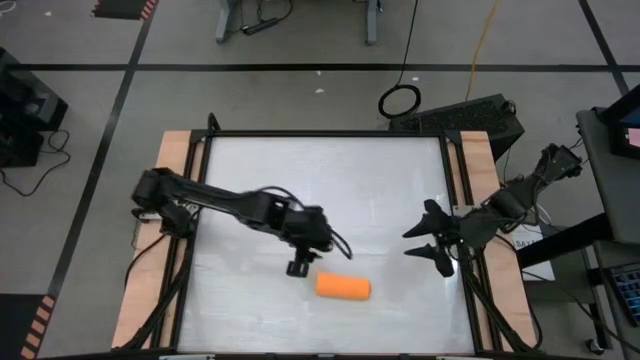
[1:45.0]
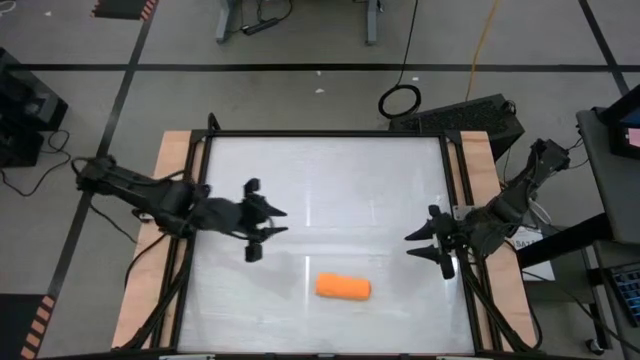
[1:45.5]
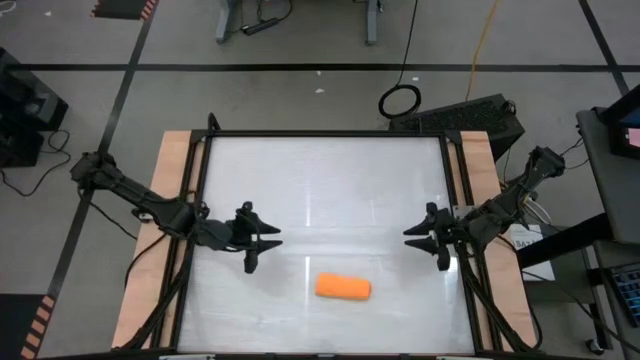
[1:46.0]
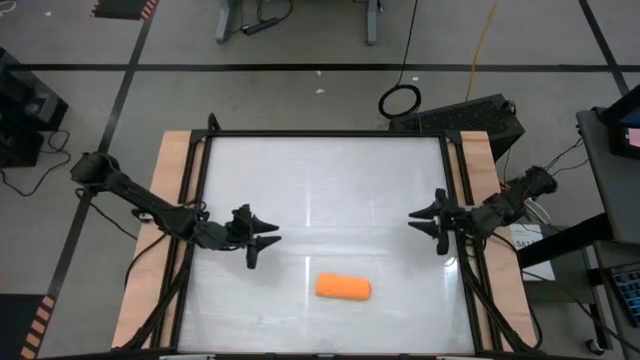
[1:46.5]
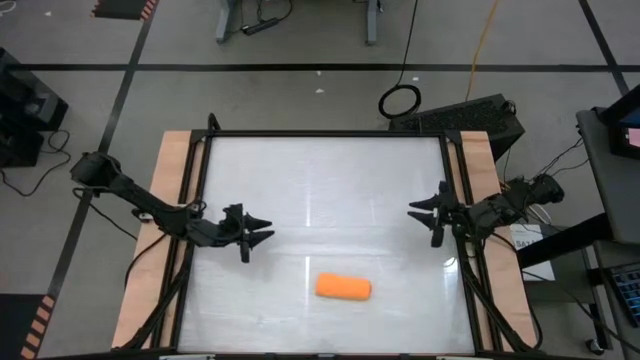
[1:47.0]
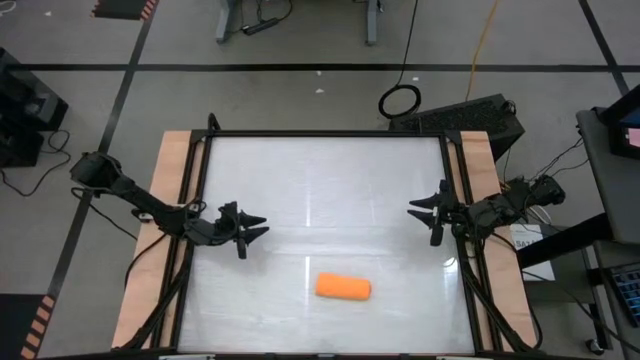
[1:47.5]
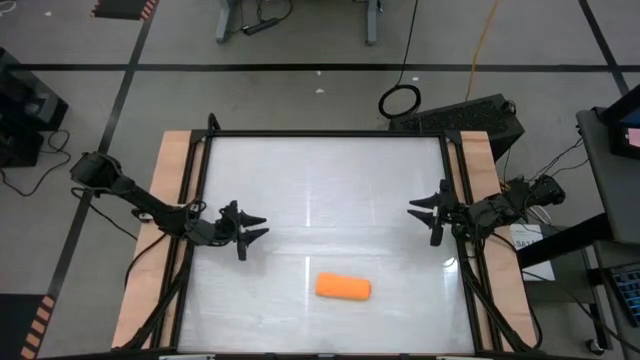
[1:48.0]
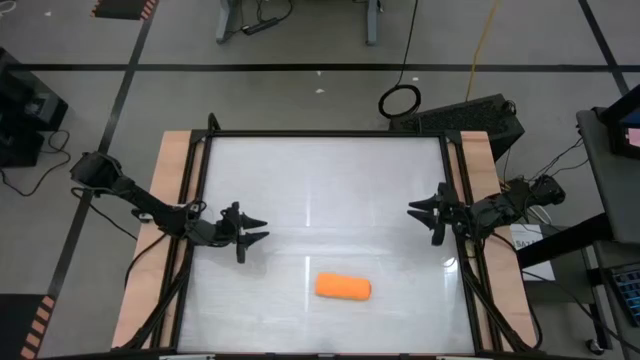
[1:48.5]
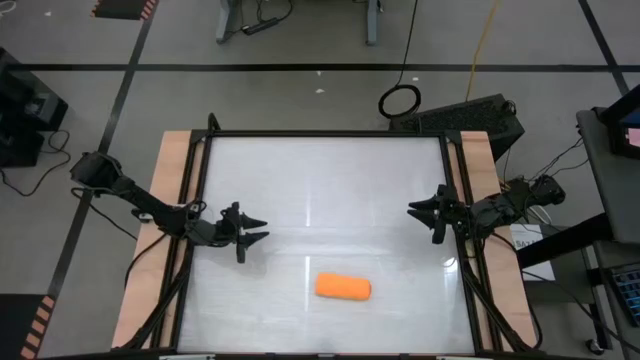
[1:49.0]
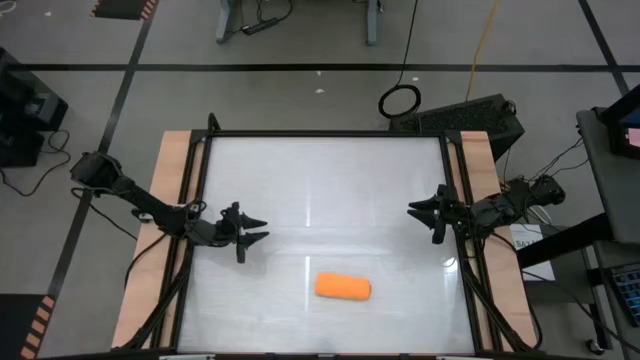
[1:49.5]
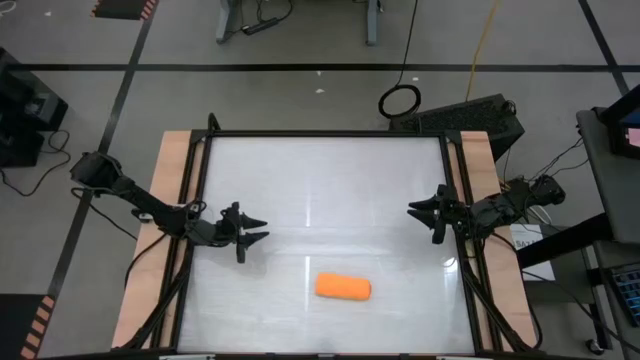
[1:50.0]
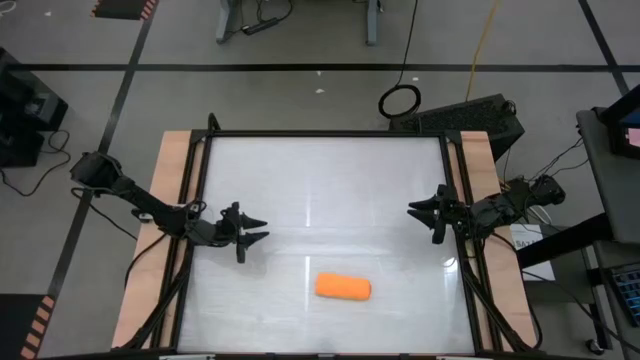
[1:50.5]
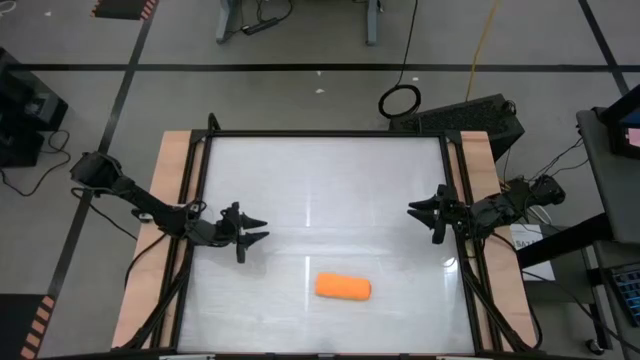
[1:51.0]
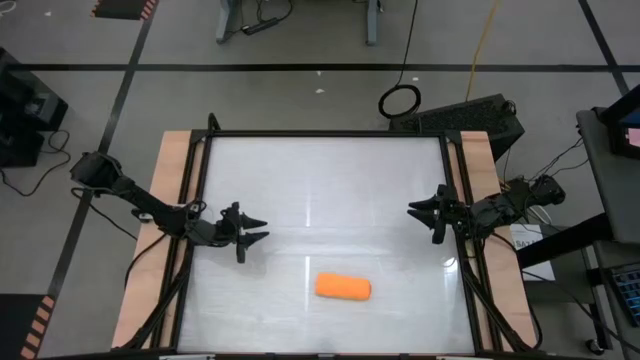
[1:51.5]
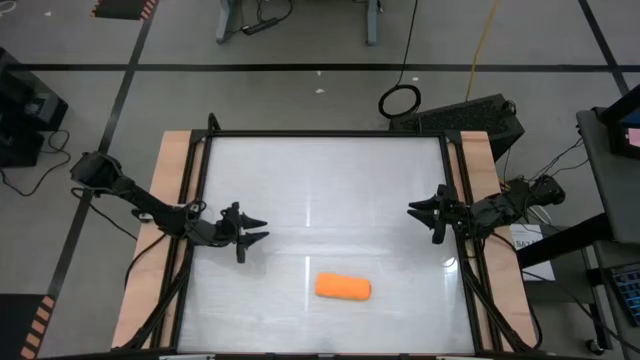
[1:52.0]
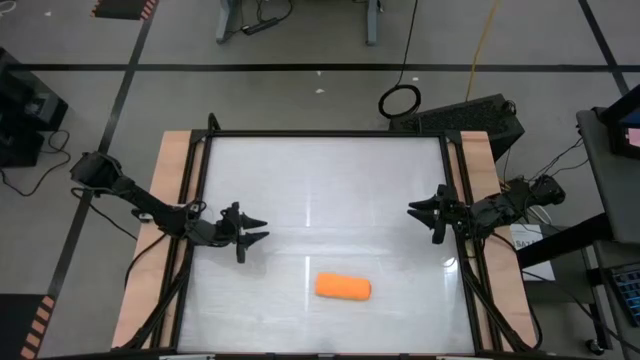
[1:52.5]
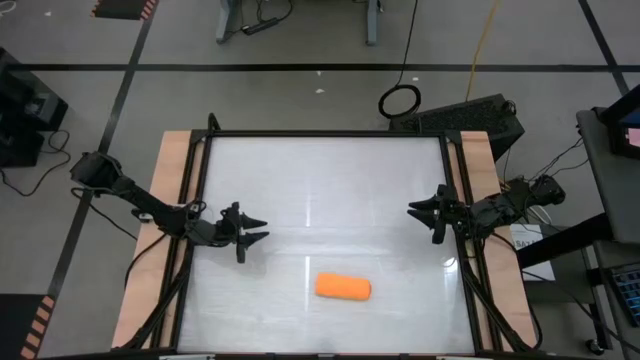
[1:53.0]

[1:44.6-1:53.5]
Task: Roll towel
Return to Home Position

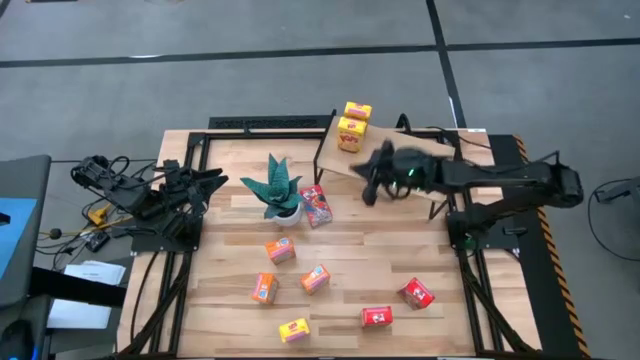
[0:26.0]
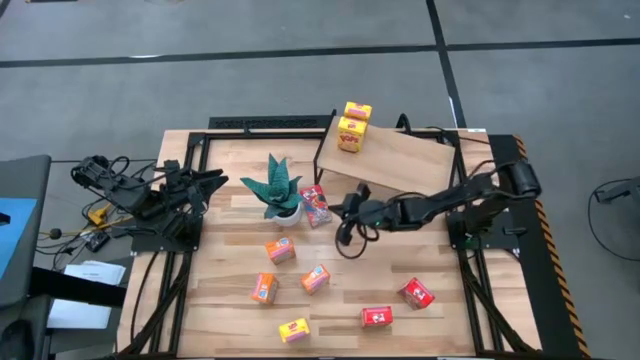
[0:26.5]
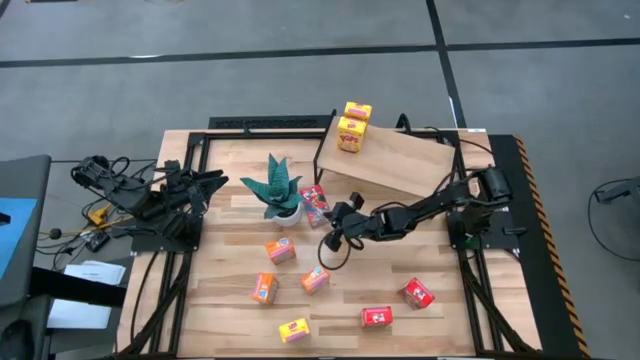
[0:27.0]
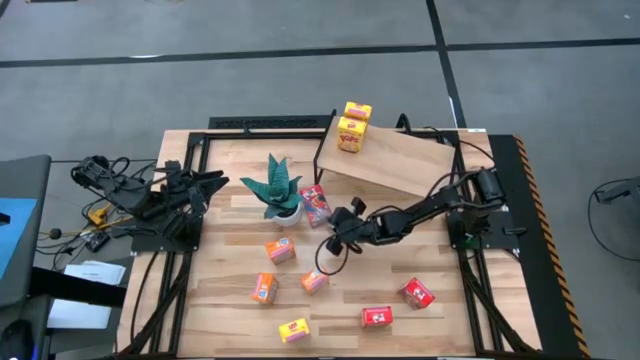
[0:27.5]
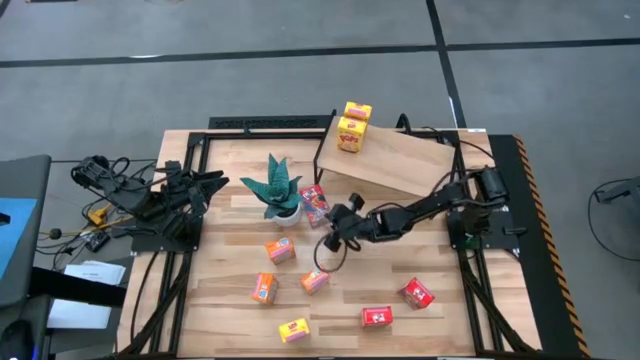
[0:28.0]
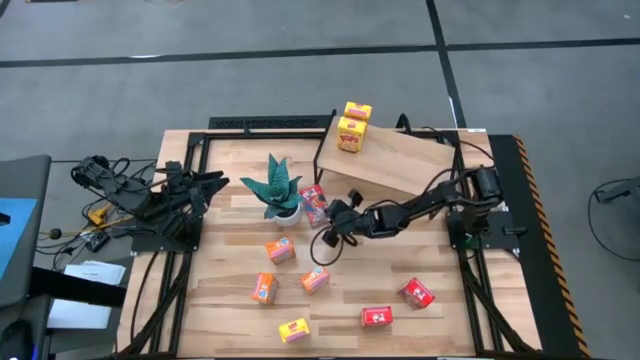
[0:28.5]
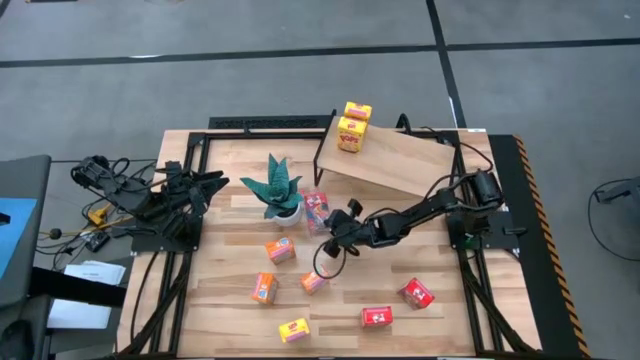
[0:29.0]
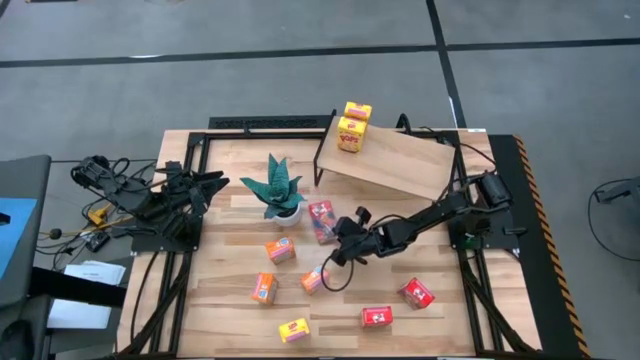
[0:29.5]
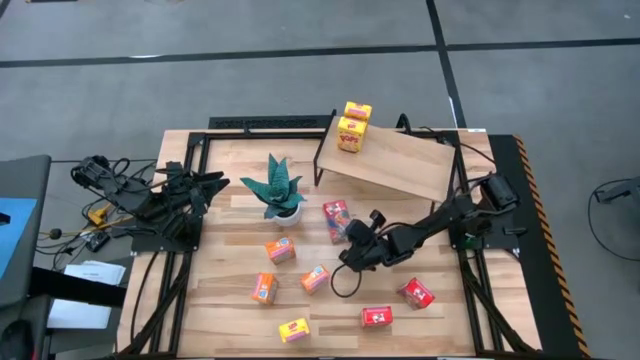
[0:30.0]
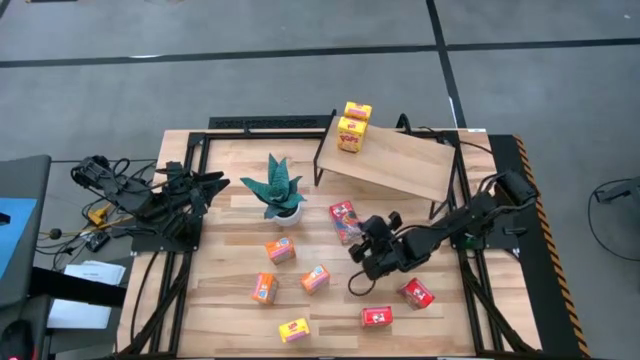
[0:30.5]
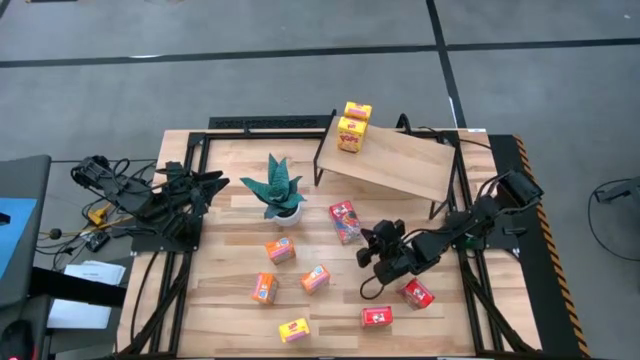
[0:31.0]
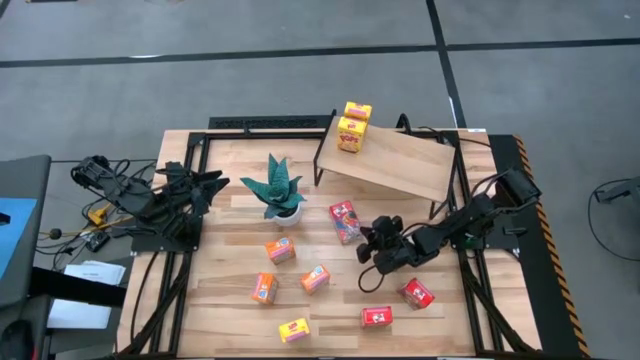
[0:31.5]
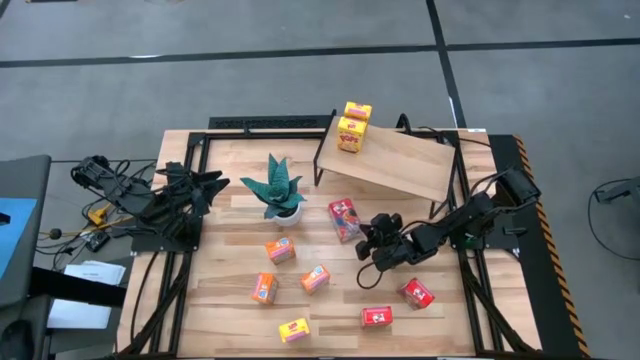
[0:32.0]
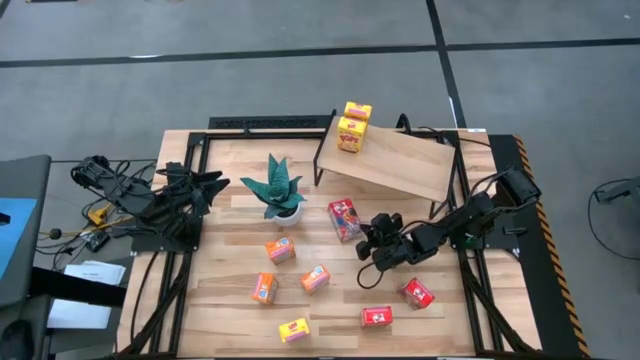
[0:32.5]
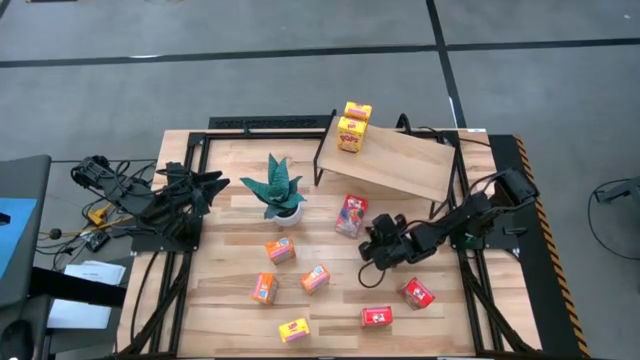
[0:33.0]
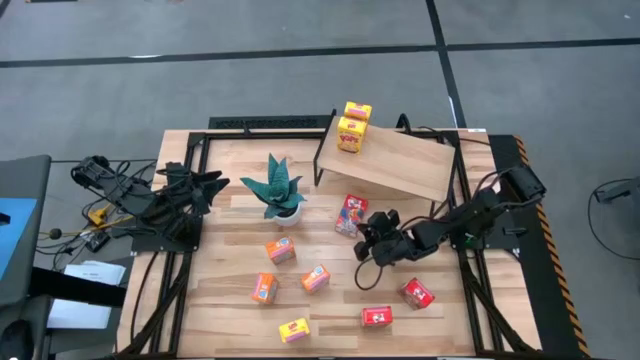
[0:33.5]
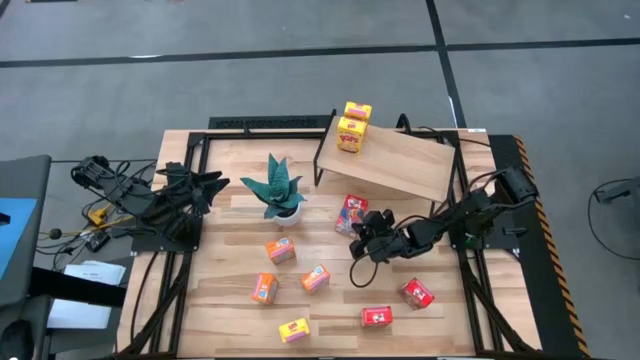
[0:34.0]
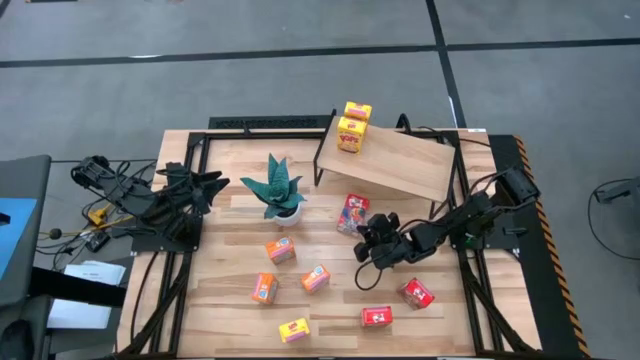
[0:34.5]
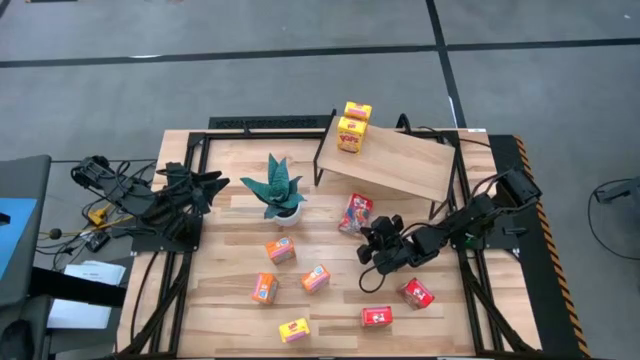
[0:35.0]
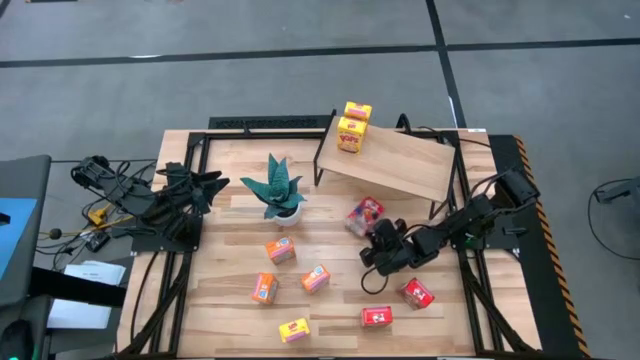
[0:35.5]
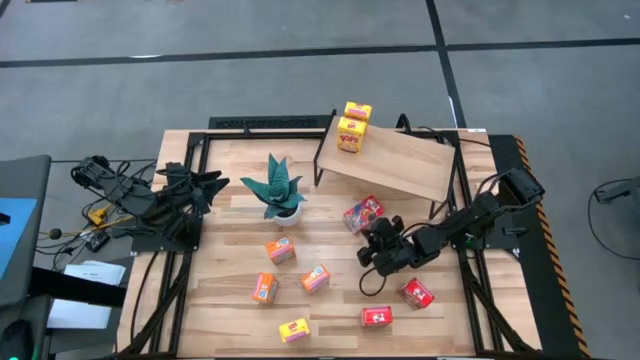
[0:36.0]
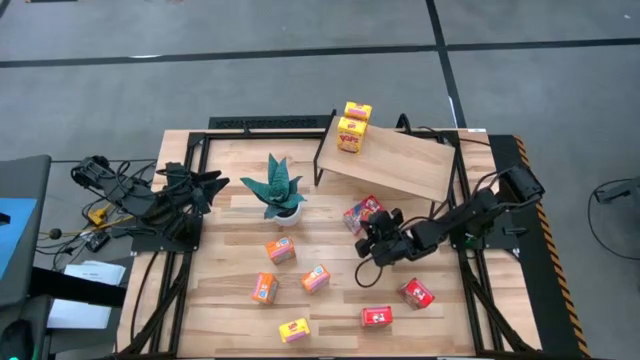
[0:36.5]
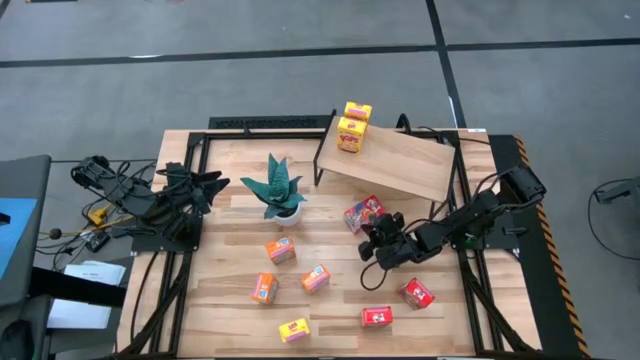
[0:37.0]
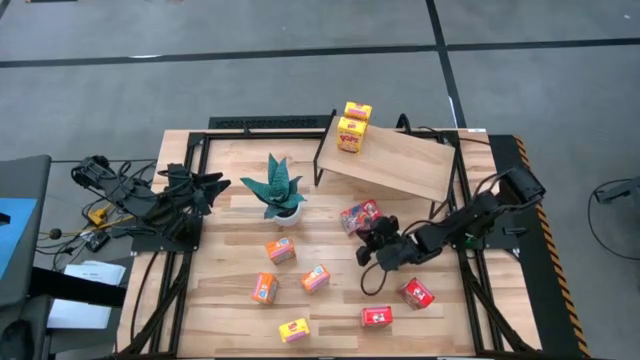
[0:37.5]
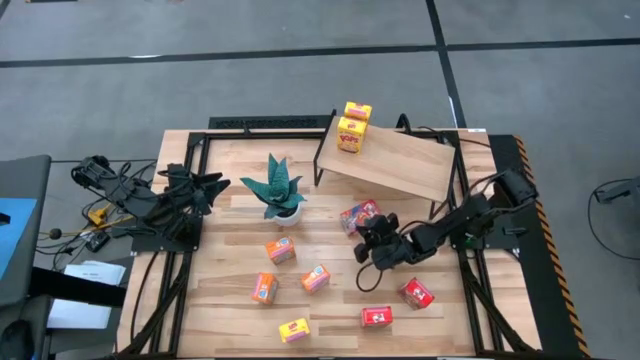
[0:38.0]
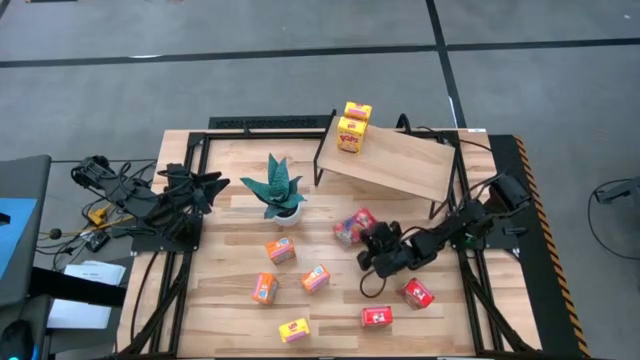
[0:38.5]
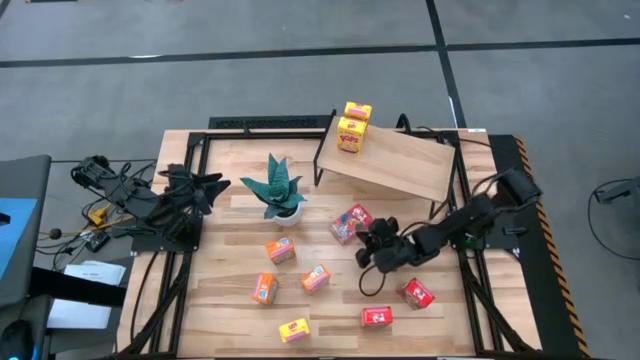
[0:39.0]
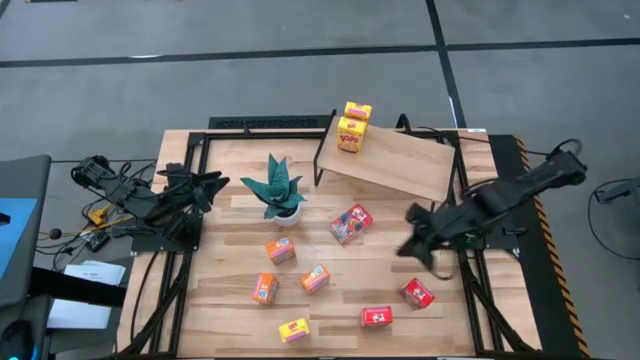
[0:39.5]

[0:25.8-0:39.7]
Task: Stack cereal on shelf
Put the top red cereal box on the shelf
